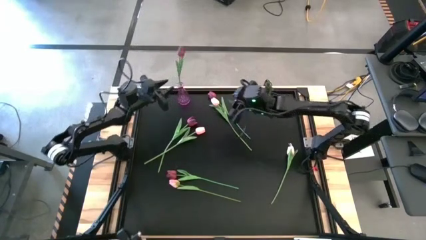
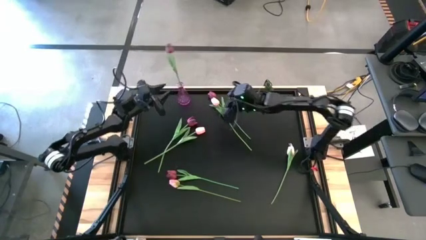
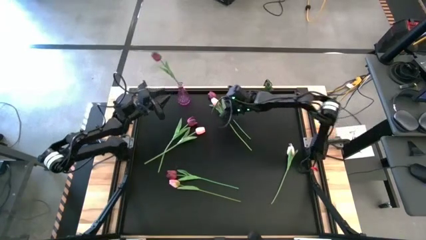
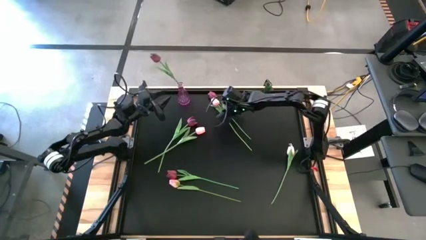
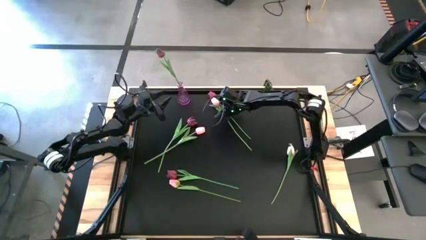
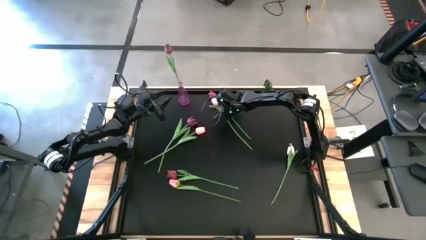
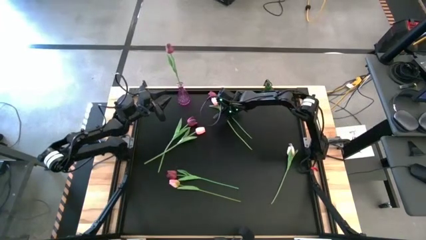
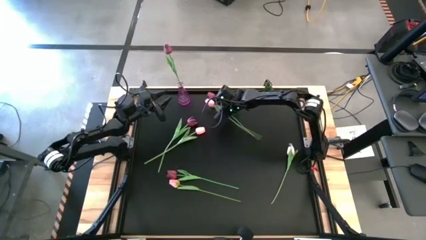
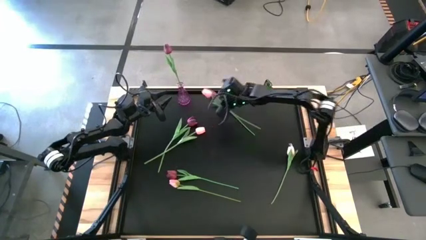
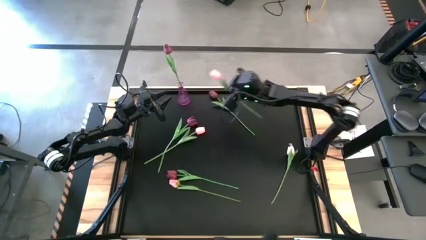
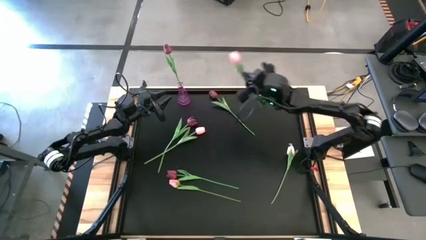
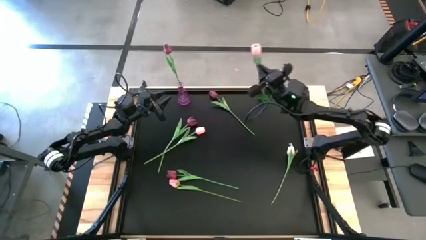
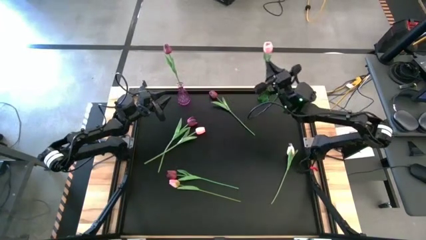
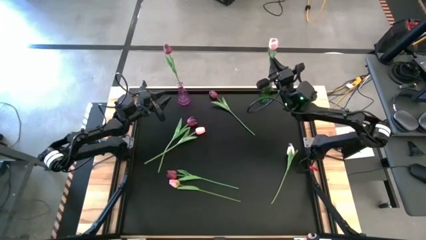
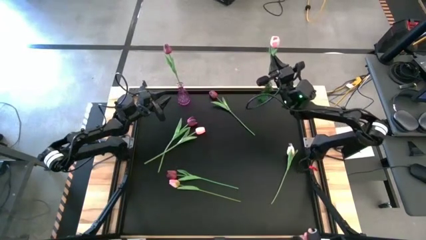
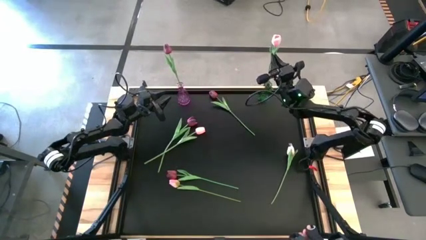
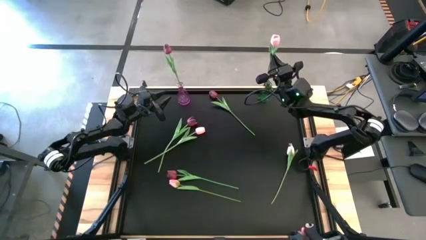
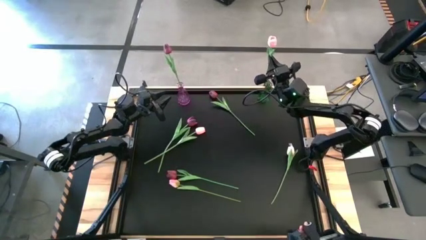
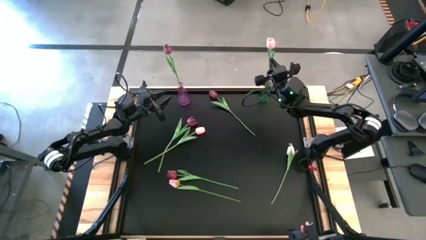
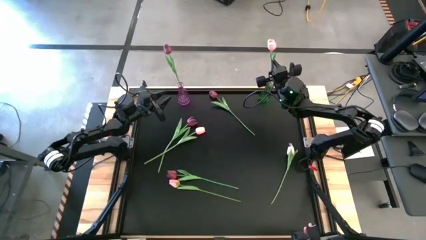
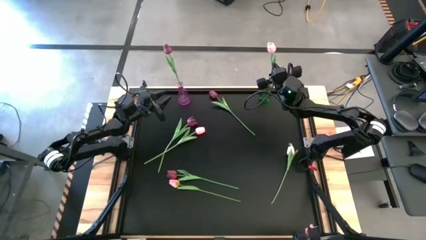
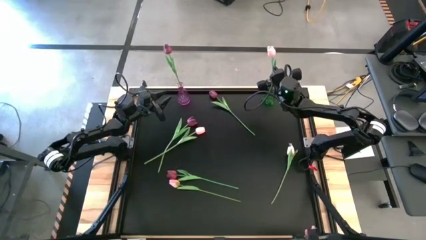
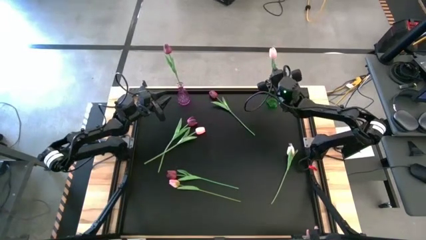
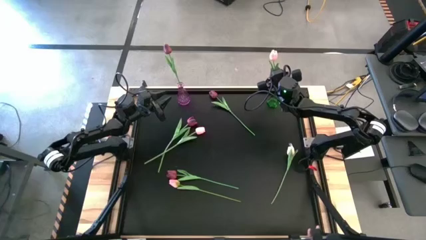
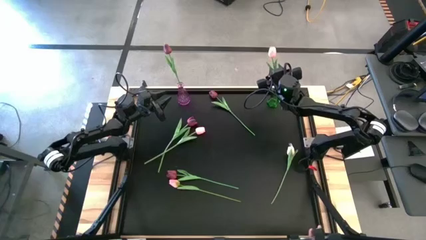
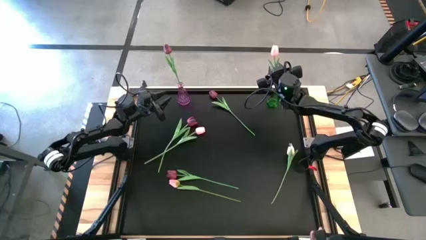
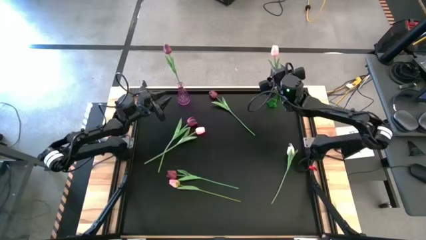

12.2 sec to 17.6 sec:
Task: Sort flowers into vase by color
Put the top center pink flower into the green vase

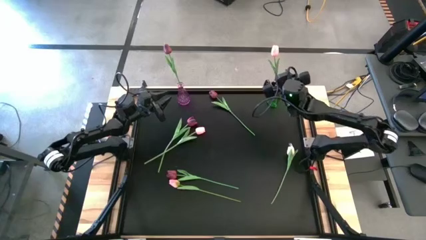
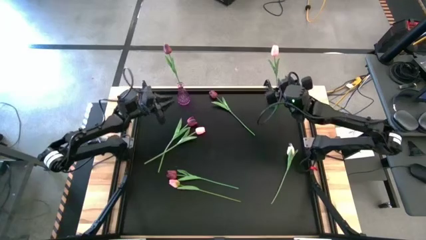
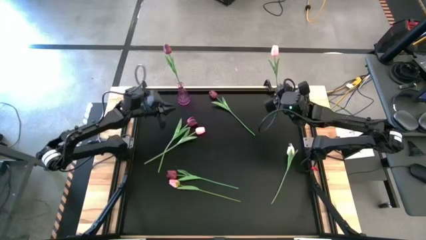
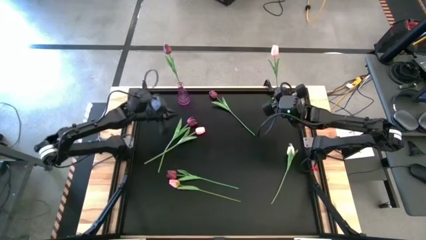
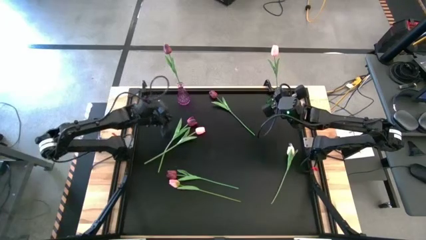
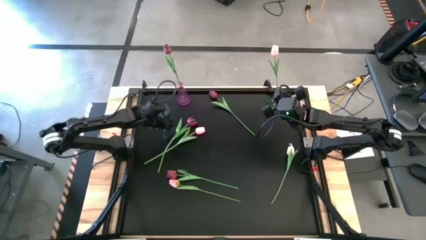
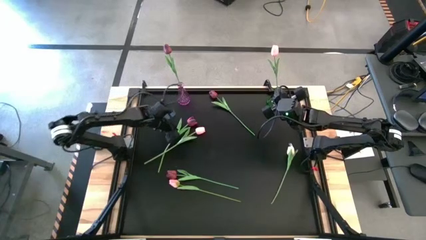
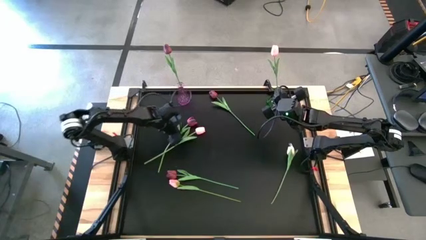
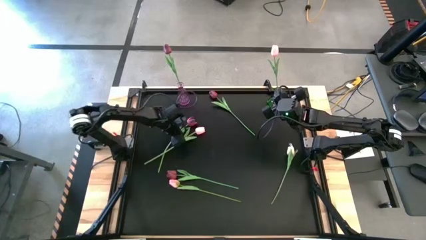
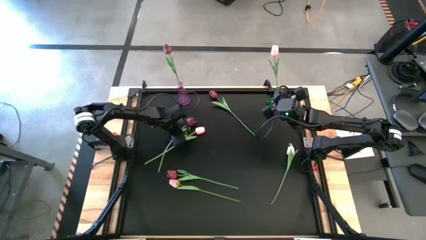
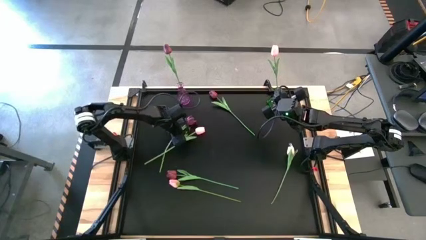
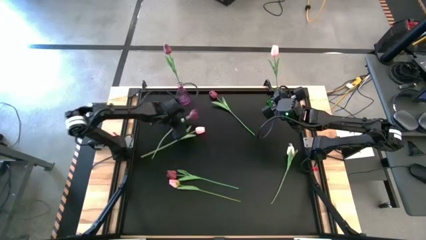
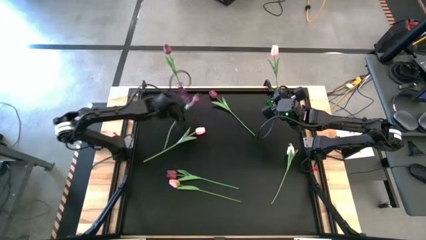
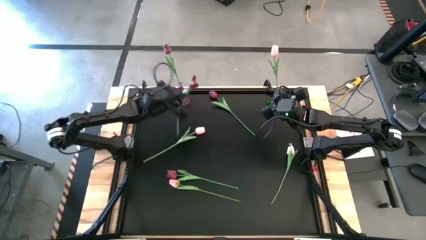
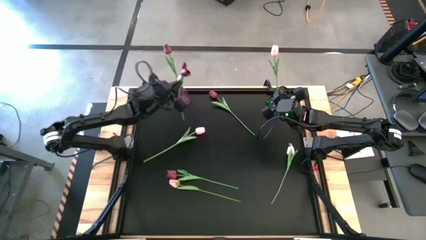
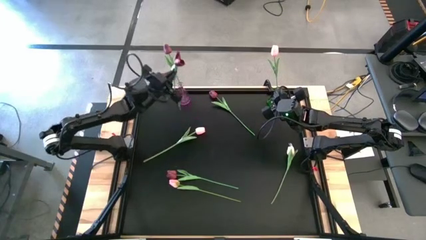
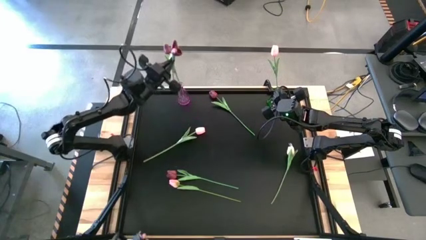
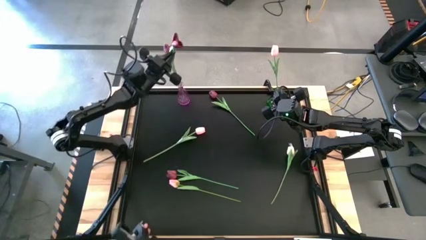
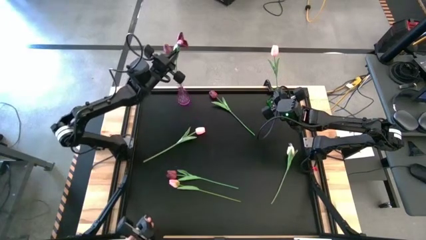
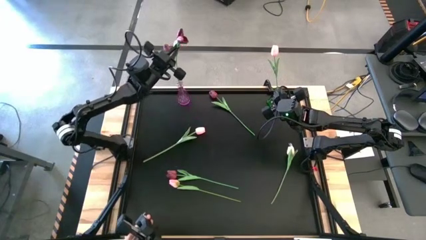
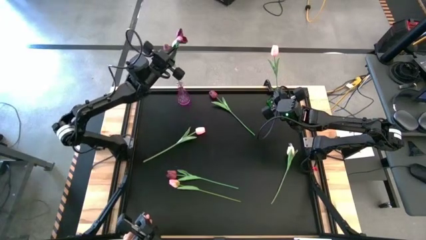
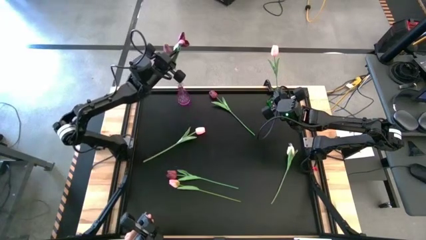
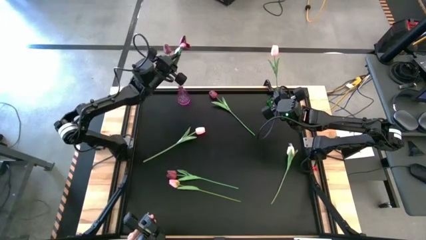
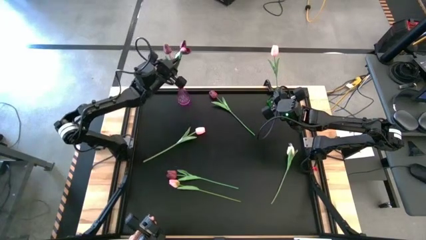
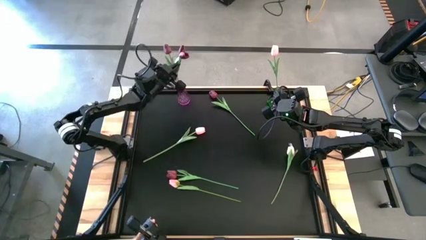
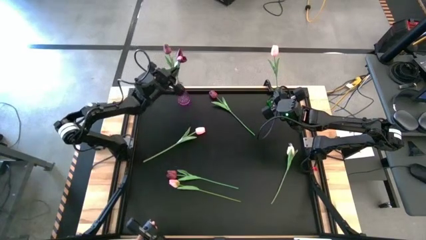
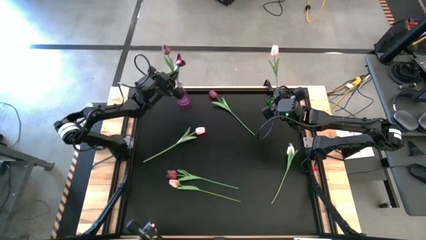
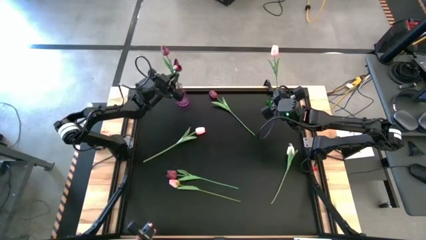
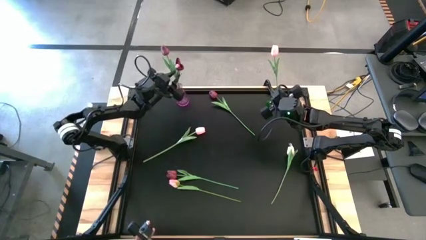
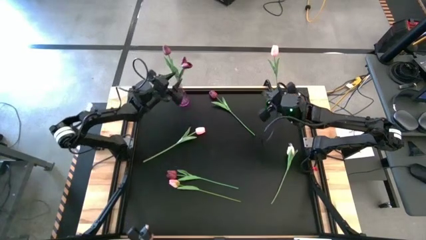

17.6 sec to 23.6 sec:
Put the middle left red flower into the purple vase

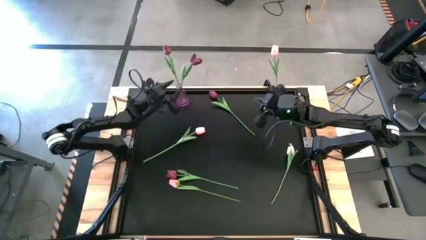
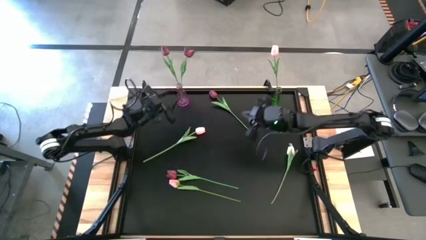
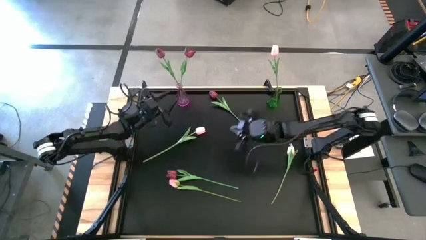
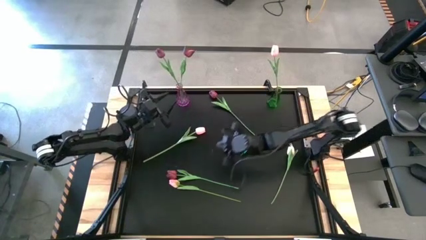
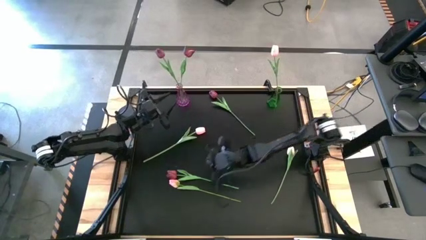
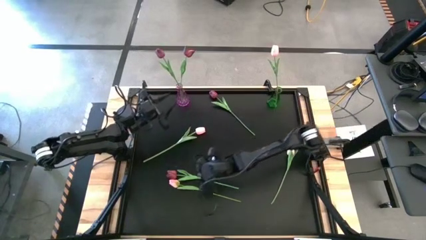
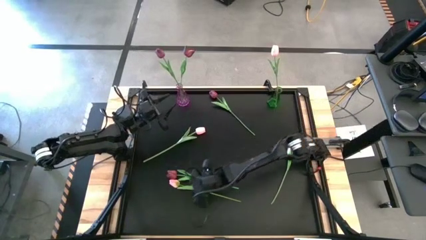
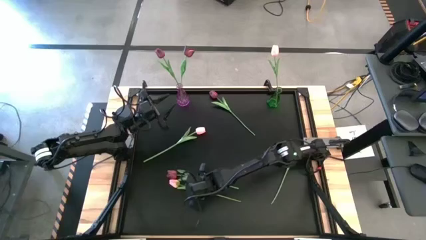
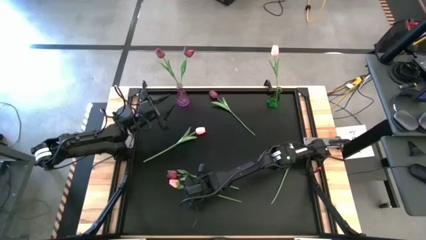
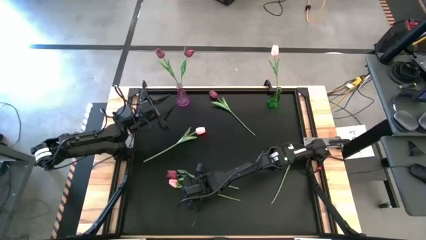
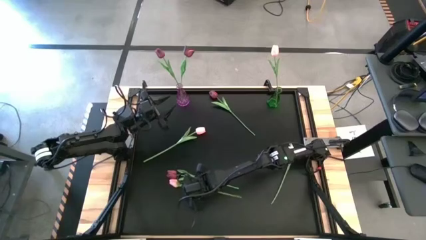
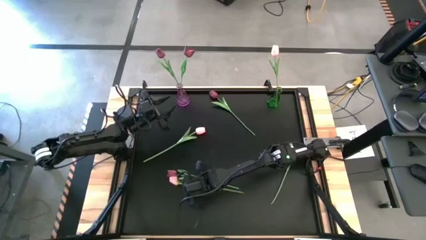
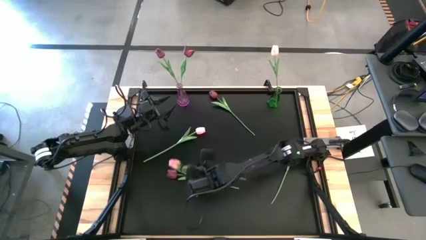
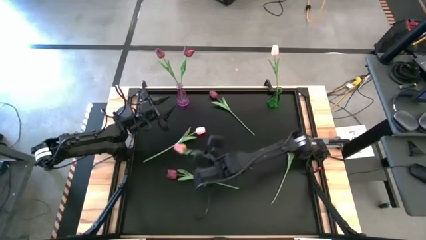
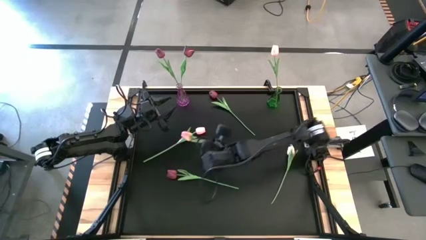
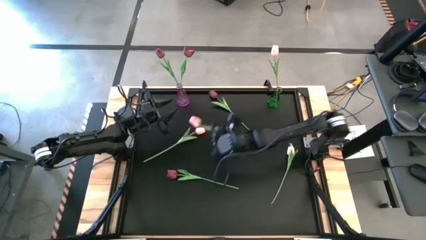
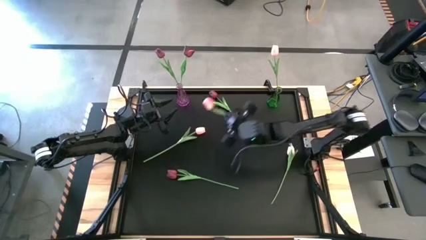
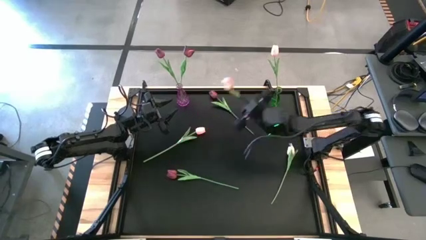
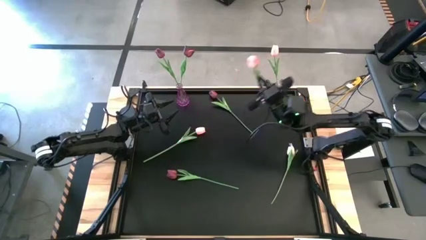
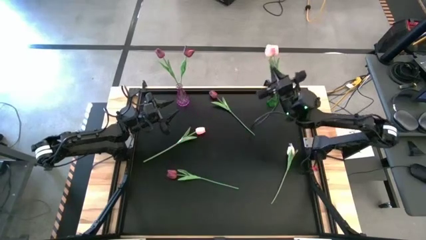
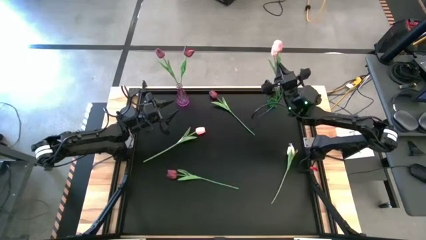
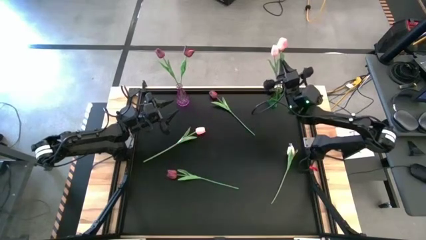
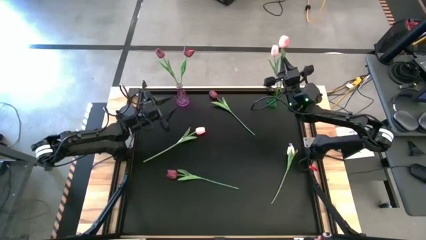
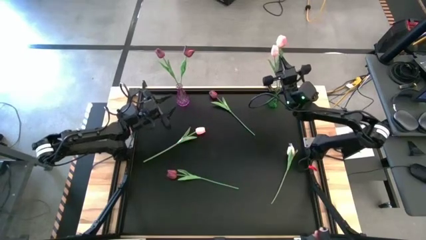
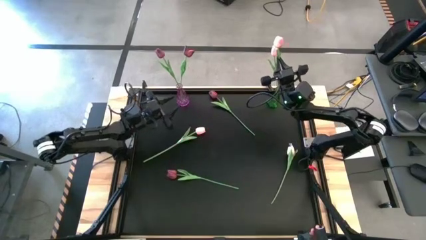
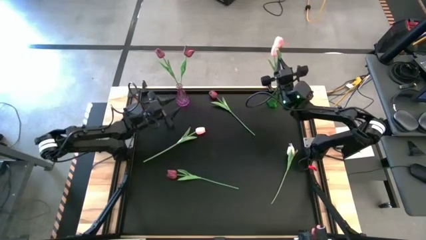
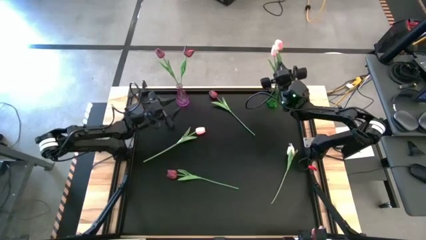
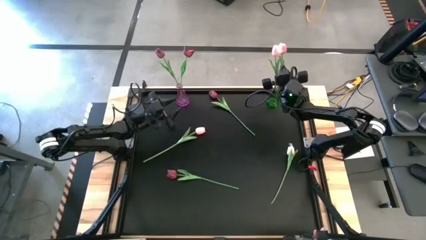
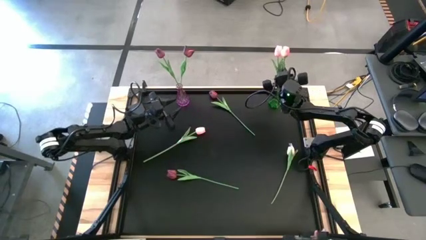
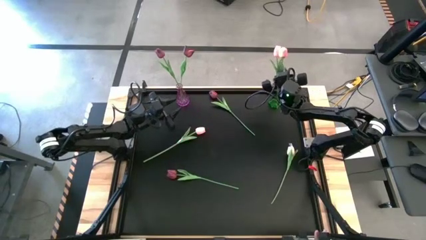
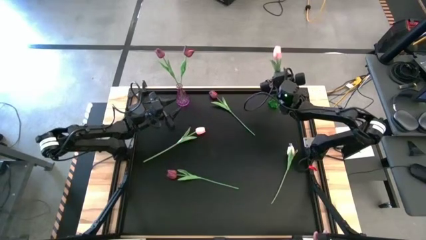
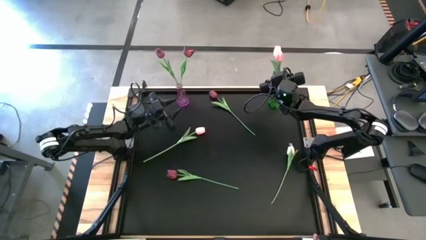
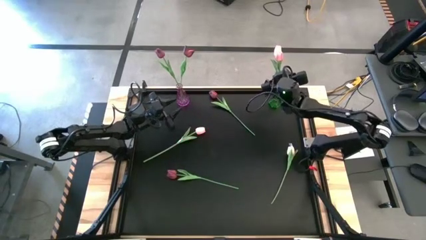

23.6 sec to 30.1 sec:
Put the bottom left pink flower into the green vase
